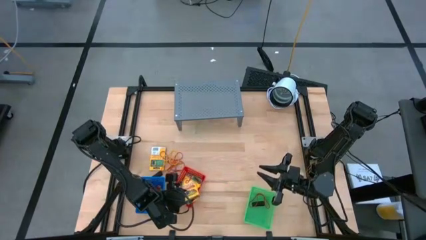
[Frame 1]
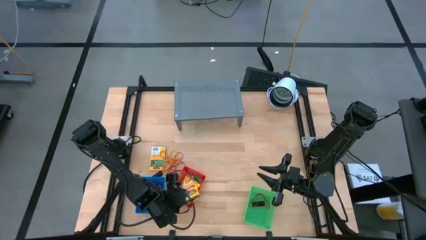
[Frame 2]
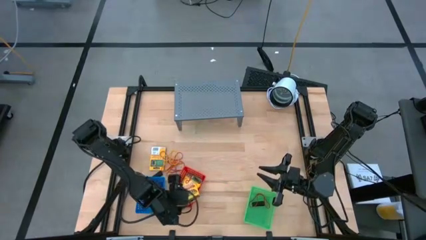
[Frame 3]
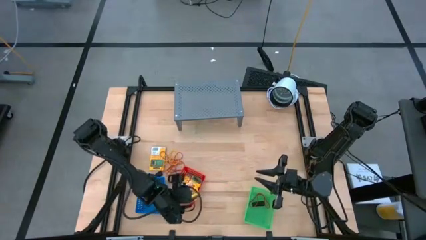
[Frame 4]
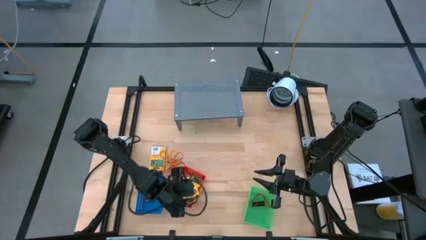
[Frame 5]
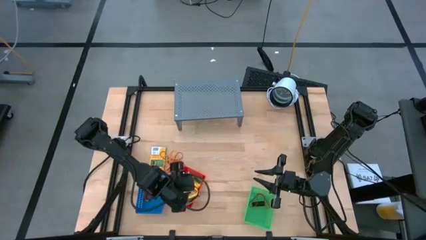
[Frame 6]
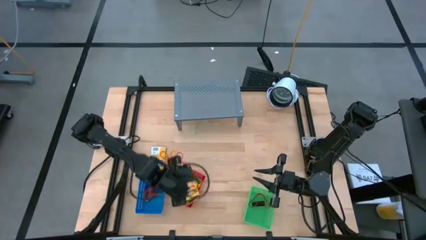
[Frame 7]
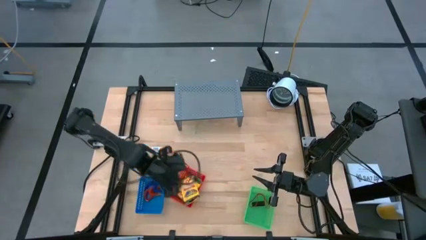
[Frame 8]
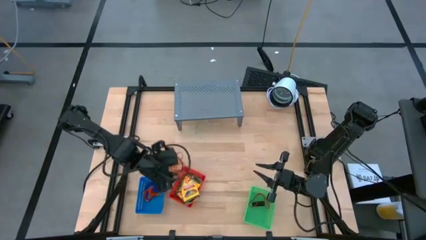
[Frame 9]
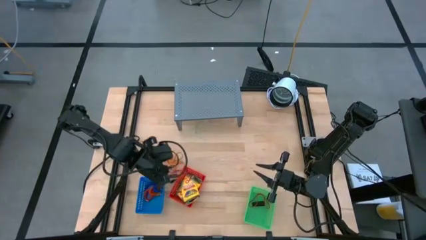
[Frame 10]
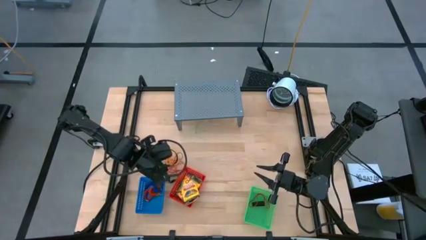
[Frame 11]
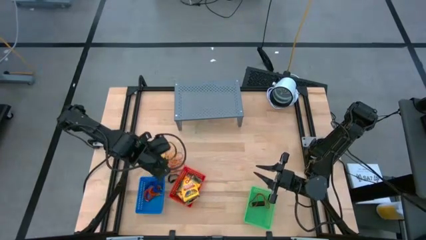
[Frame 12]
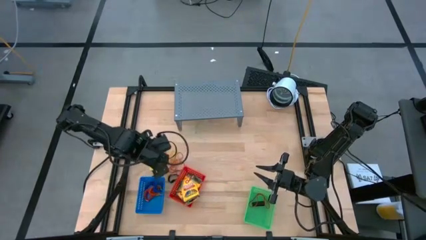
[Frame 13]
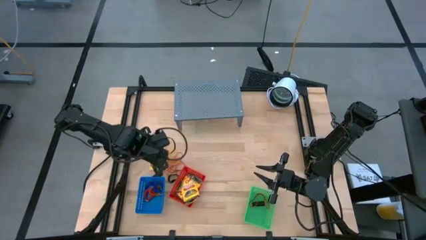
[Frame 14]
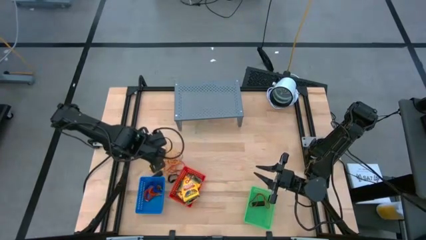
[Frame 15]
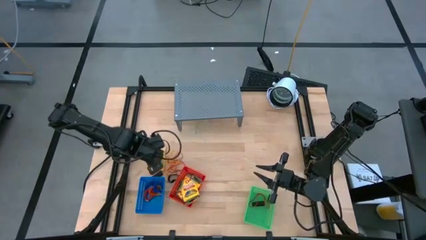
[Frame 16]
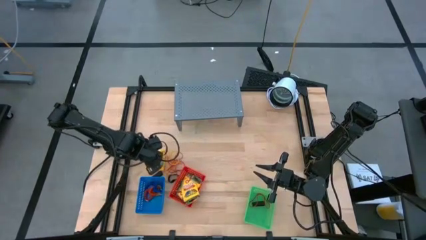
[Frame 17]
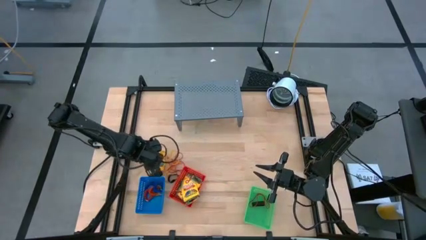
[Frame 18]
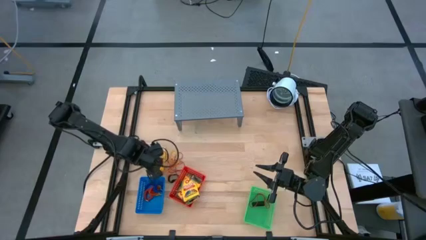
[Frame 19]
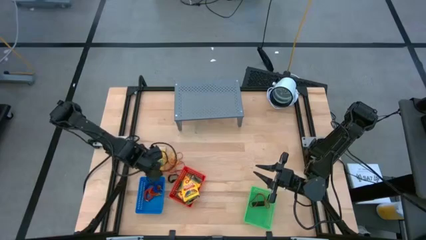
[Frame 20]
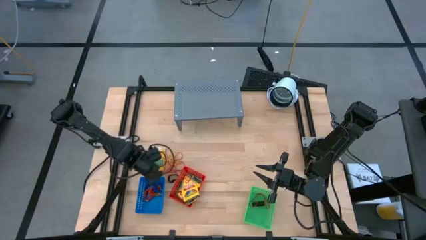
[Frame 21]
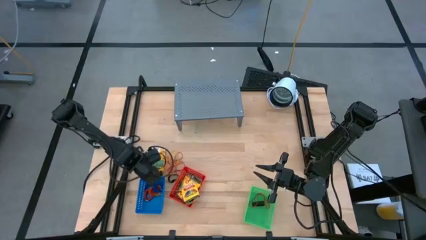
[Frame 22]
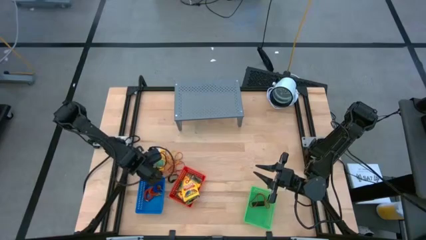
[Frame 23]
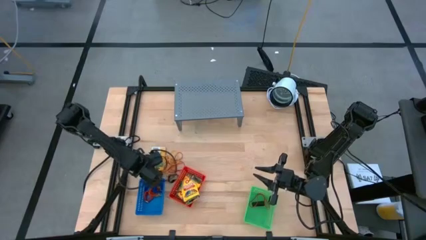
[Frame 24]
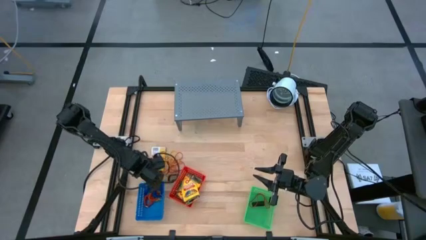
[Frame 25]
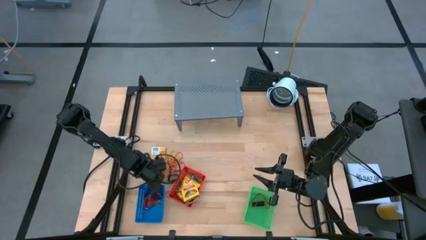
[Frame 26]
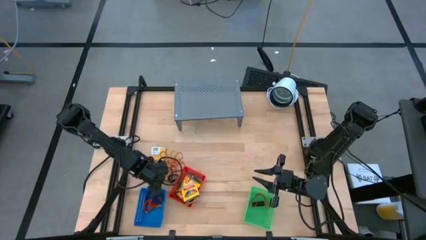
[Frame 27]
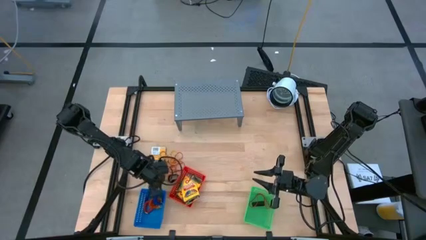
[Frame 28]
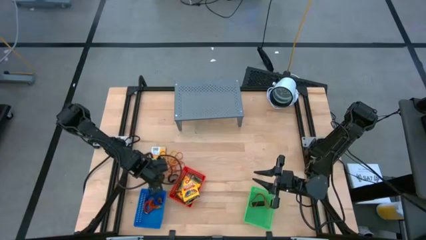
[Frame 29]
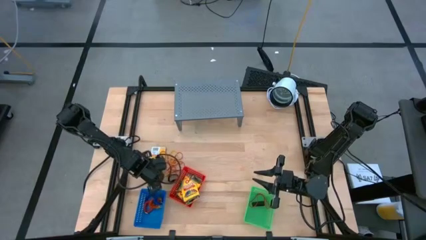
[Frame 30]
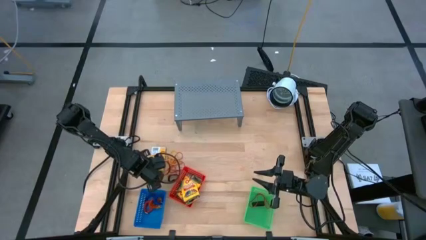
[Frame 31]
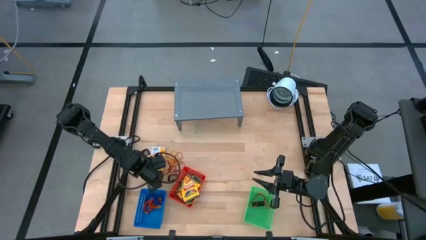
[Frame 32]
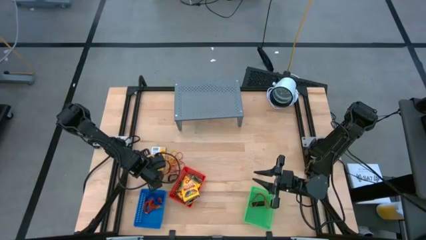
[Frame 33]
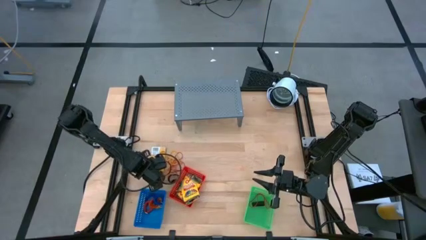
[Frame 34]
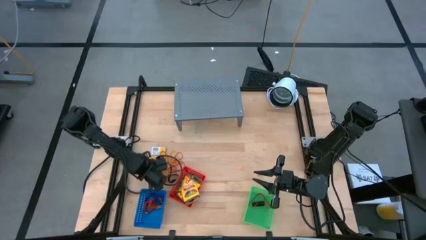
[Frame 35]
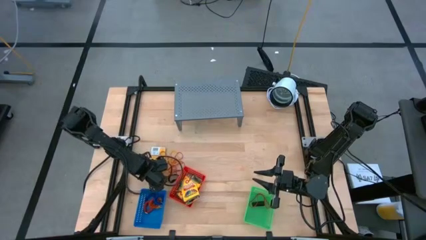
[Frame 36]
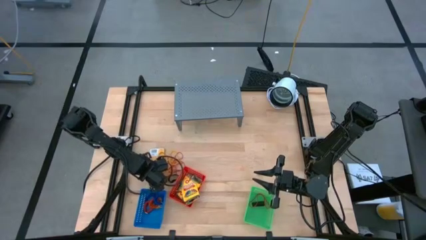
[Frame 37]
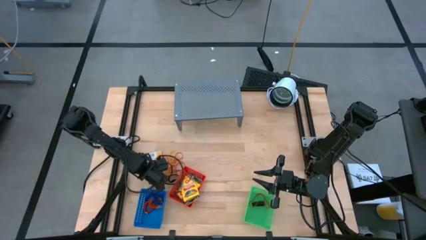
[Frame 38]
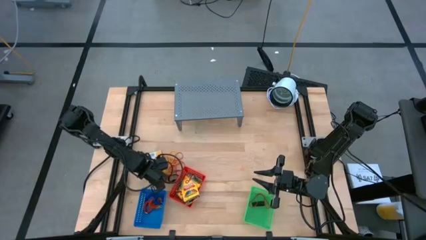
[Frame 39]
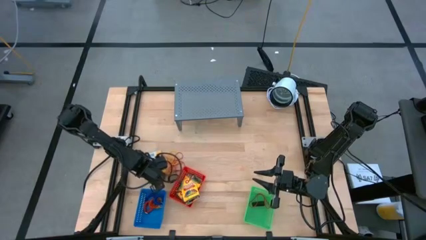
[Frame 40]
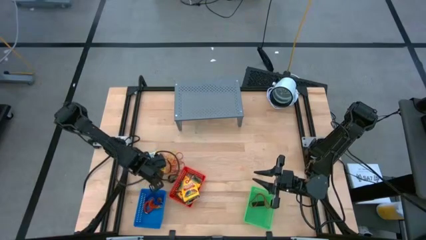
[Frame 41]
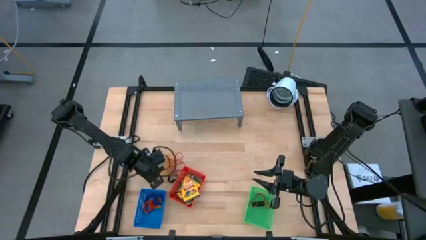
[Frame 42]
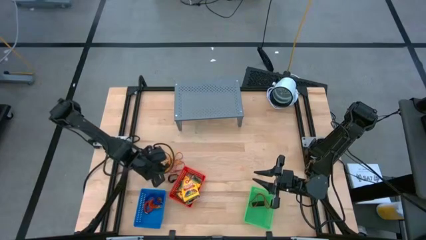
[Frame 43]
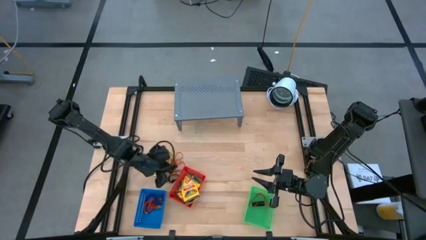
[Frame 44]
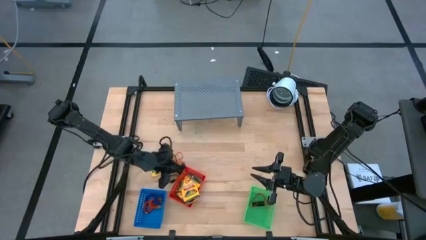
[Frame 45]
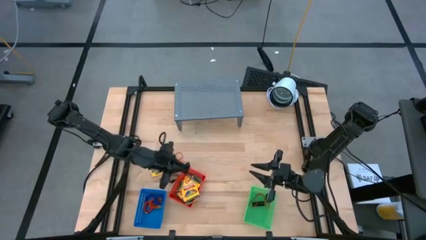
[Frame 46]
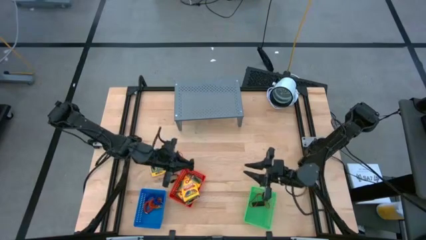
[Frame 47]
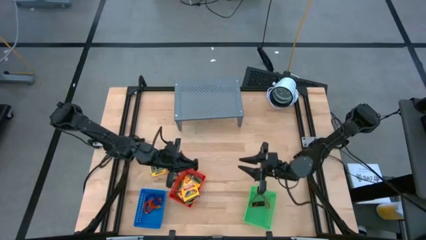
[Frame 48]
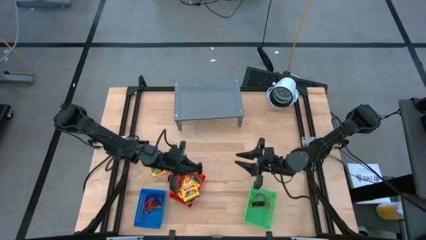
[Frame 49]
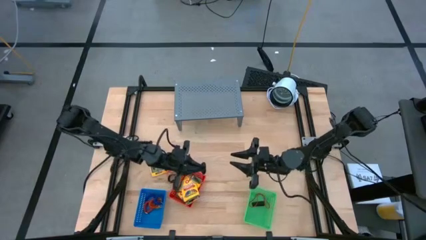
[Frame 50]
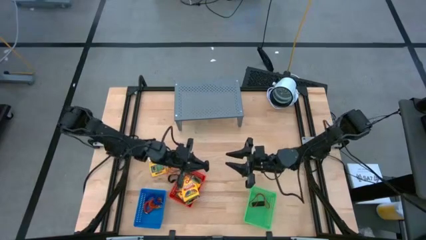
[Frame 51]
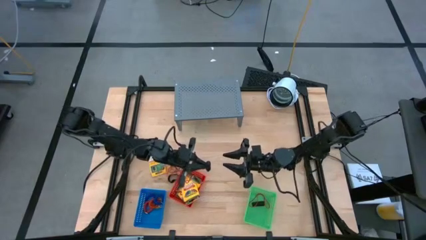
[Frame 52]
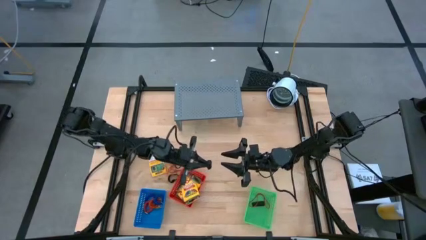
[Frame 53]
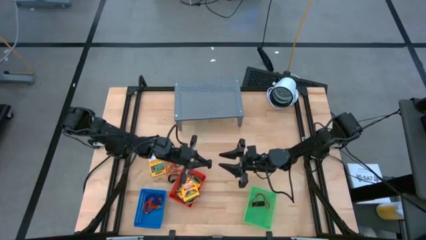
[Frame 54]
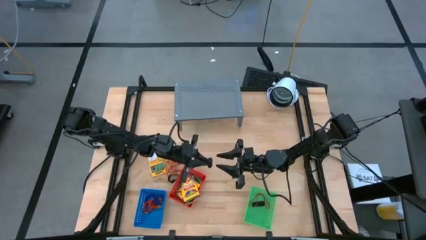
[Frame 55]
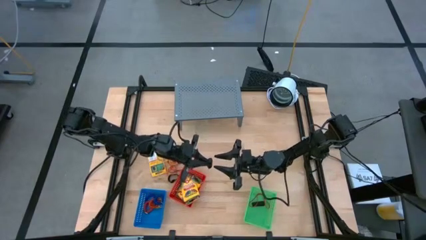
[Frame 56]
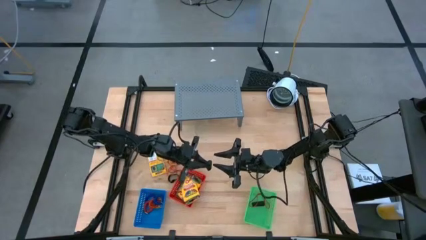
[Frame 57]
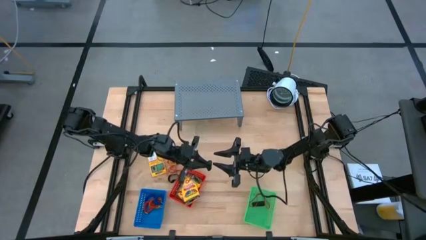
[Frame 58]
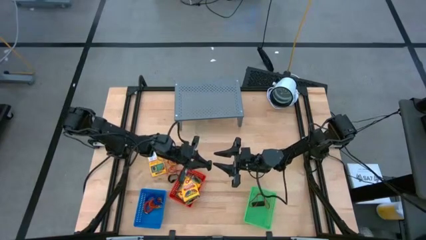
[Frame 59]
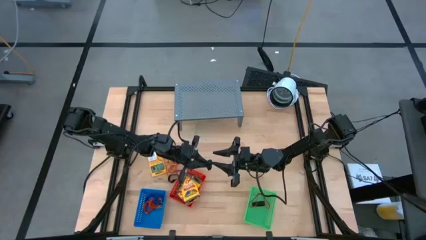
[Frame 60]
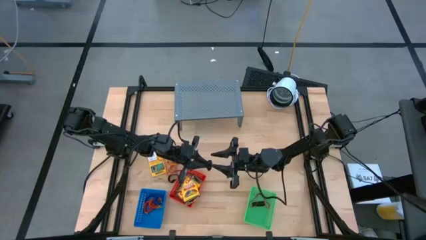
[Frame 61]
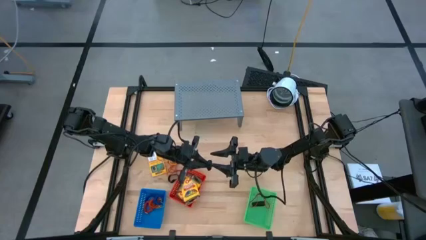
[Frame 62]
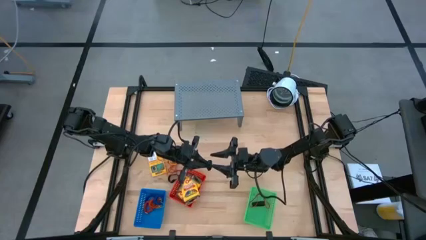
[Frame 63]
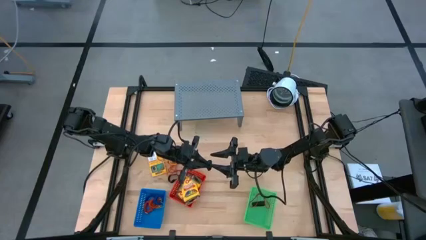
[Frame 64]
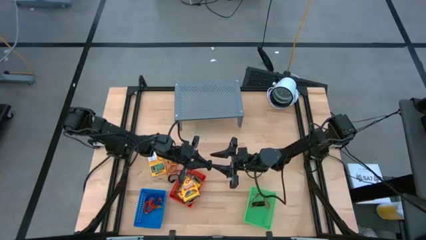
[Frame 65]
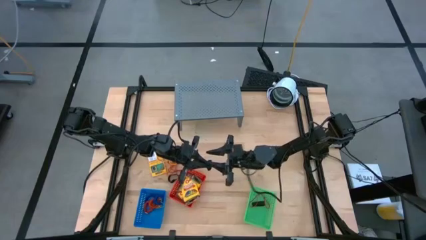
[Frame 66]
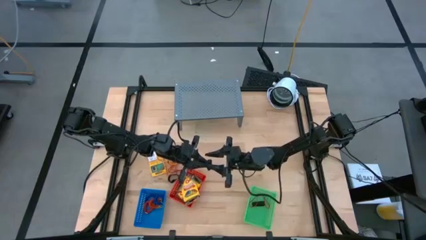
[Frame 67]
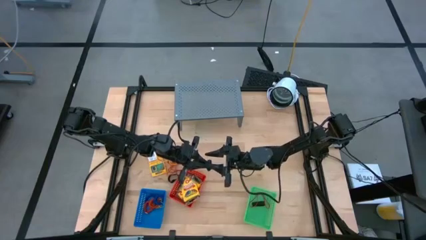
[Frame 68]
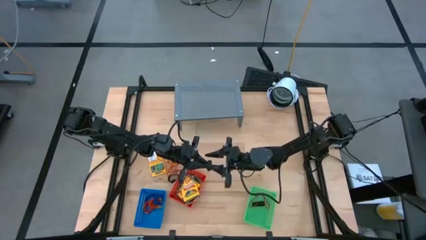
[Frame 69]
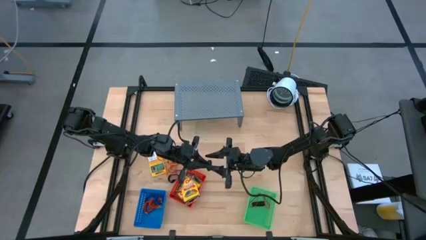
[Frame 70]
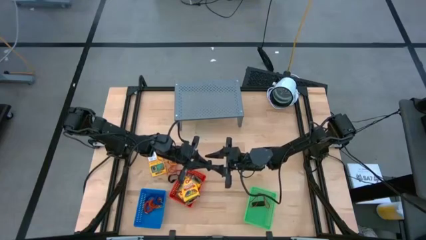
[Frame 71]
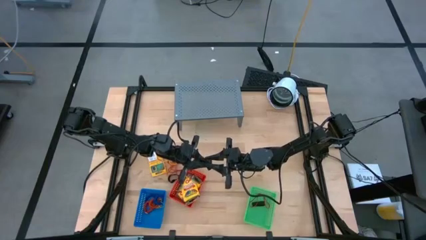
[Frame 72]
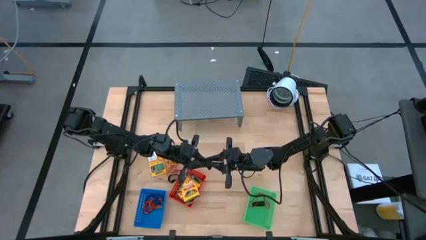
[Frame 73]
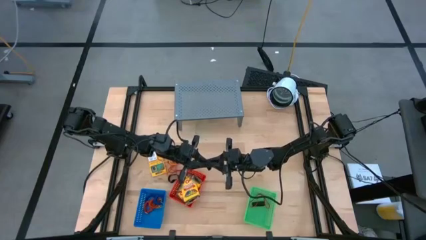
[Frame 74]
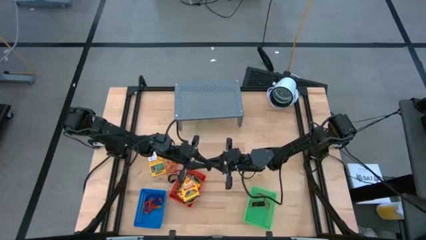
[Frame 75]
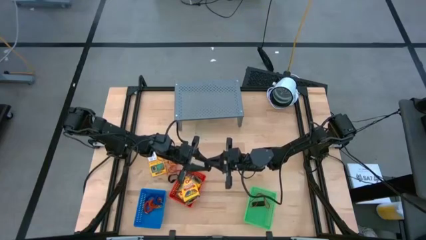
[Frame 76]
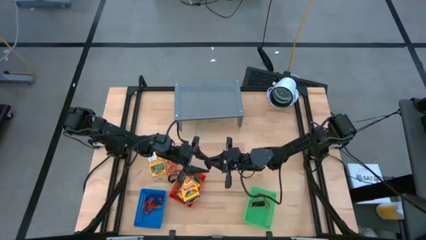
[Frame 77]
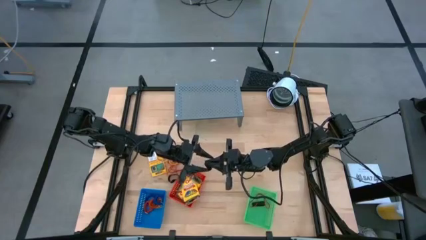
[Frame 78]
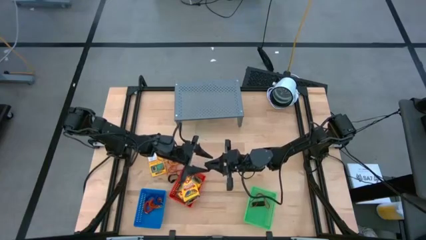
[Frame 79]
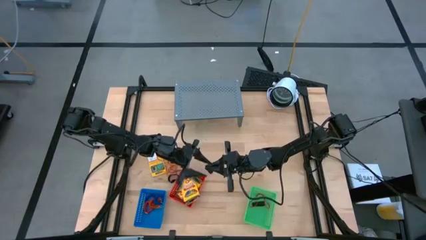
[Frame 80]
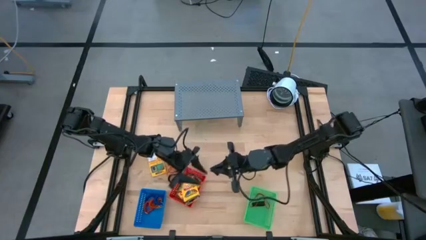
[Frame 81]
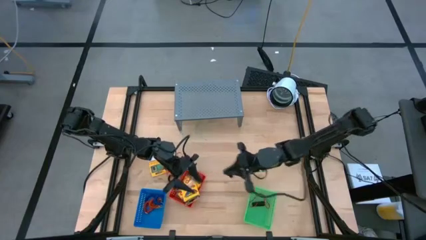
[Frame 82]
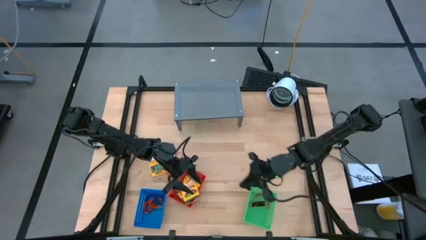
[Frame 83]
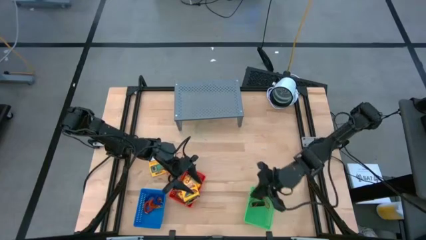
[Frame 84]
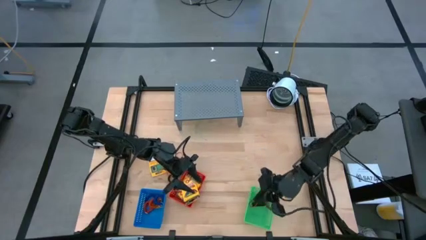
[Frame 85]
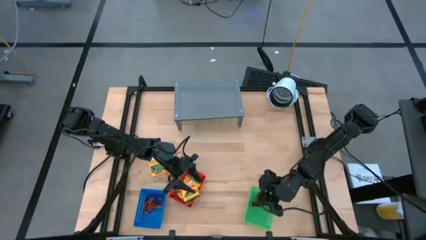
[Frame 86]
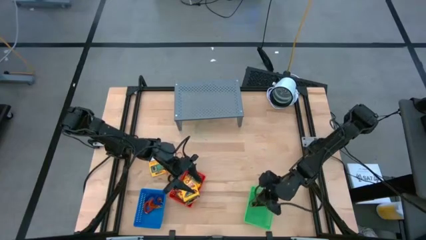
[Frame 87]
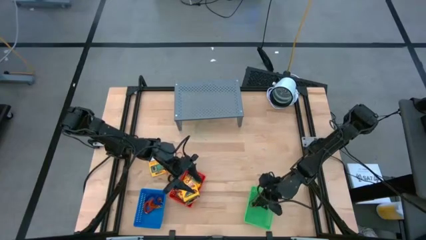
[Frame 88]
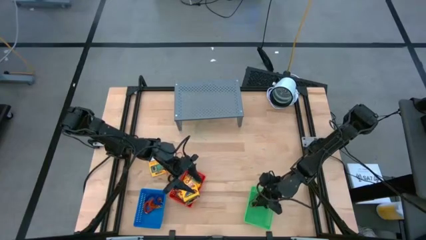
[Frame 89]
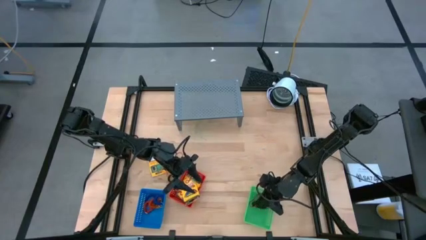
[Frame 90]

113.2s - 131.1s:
Task: Pick & Place Office Desk Supplies
Put the left black rubber band into the green basket
